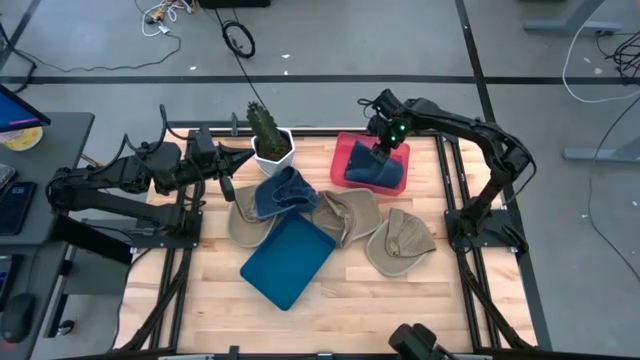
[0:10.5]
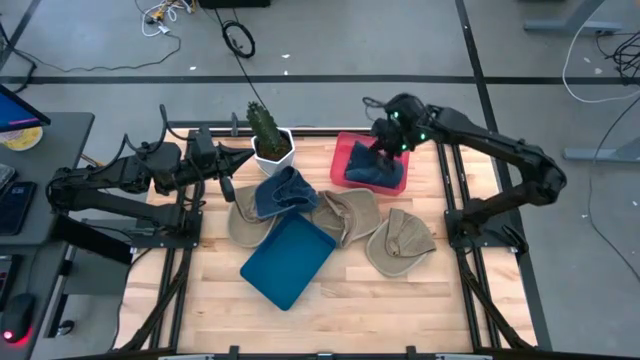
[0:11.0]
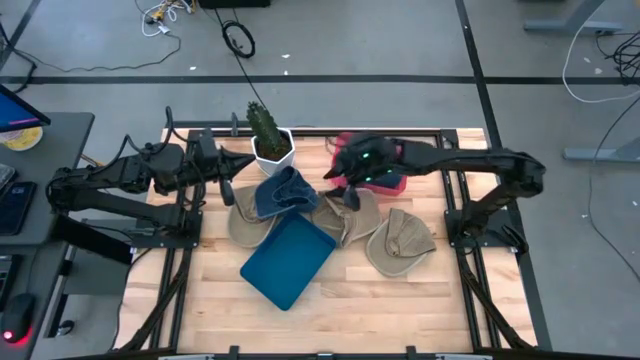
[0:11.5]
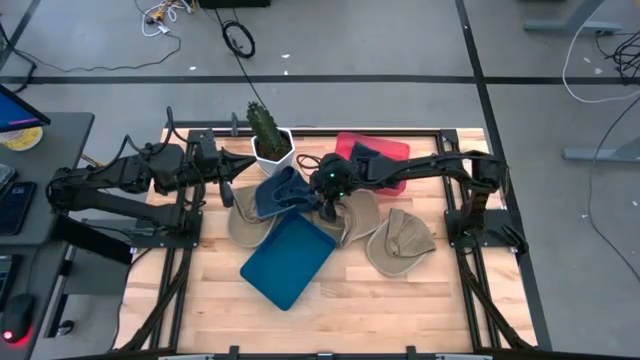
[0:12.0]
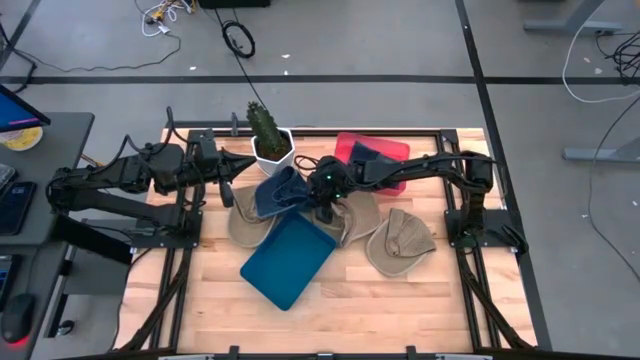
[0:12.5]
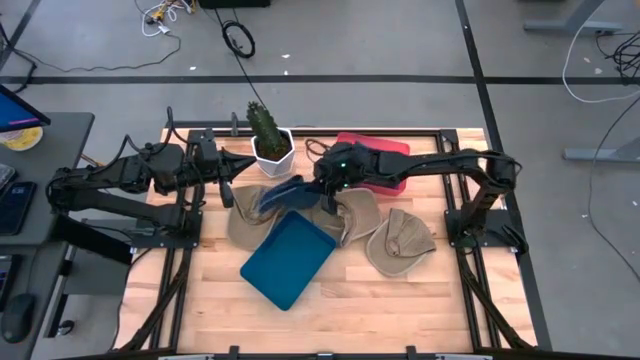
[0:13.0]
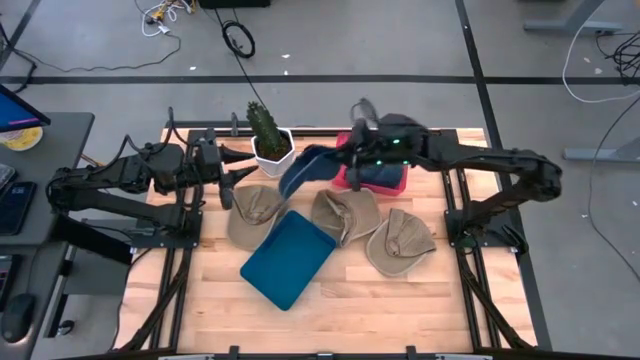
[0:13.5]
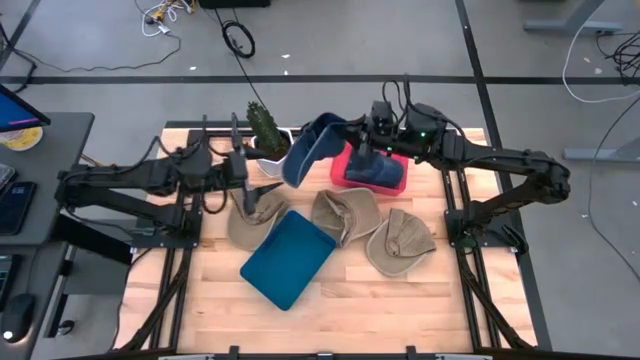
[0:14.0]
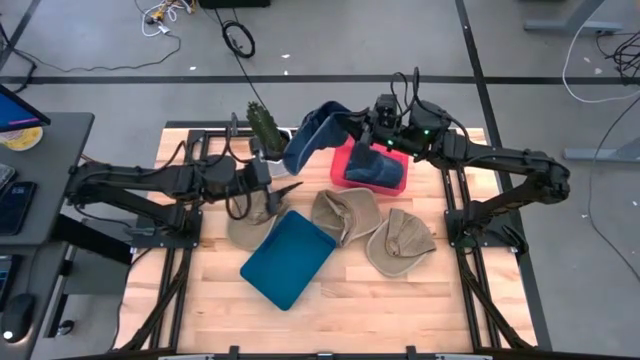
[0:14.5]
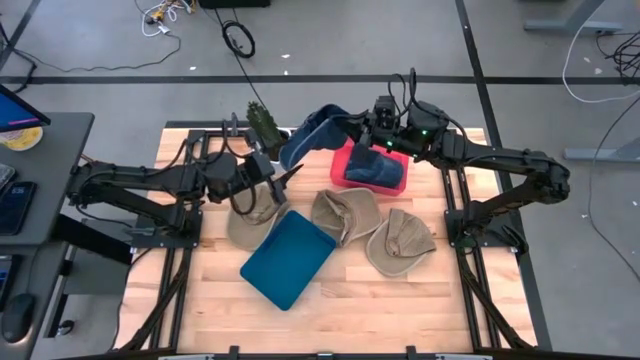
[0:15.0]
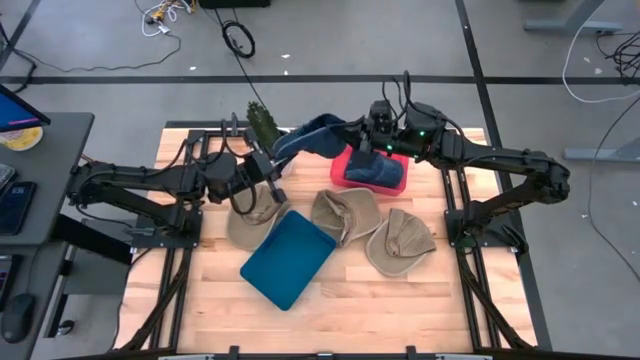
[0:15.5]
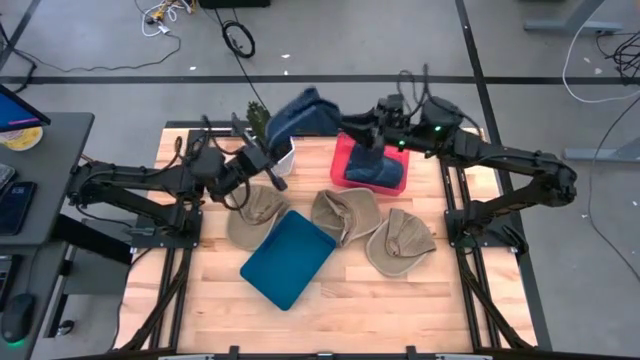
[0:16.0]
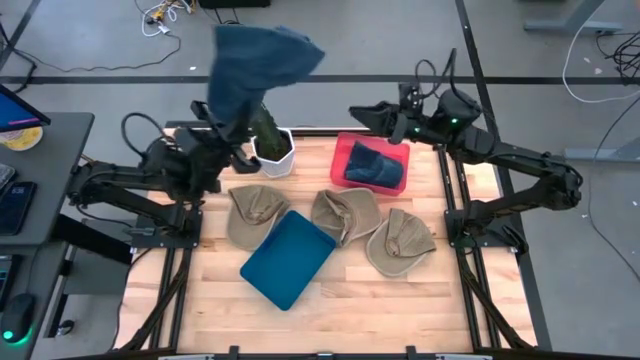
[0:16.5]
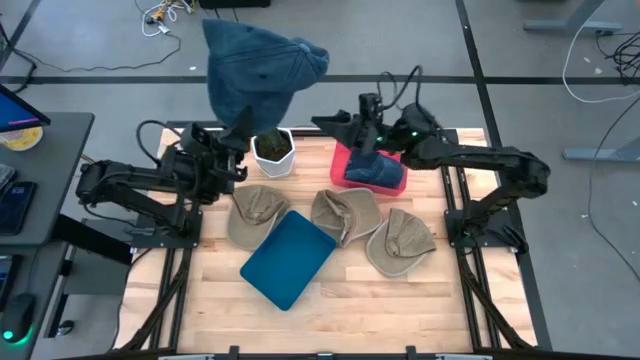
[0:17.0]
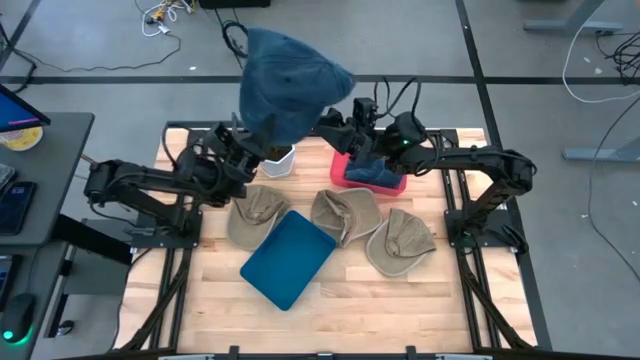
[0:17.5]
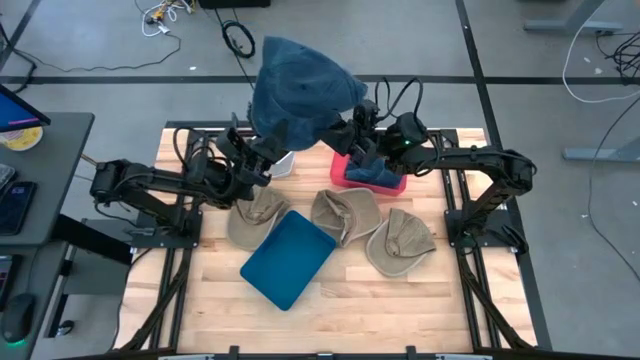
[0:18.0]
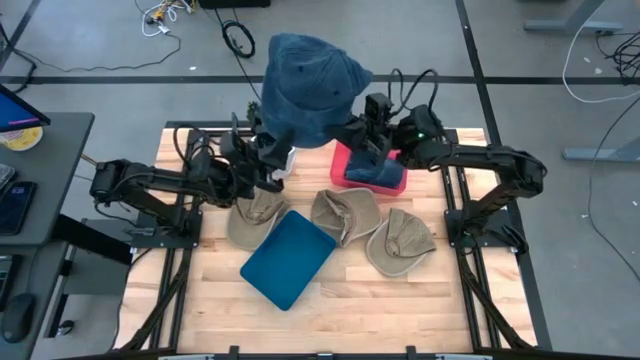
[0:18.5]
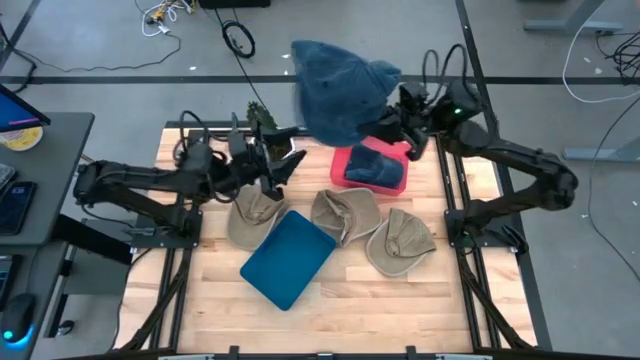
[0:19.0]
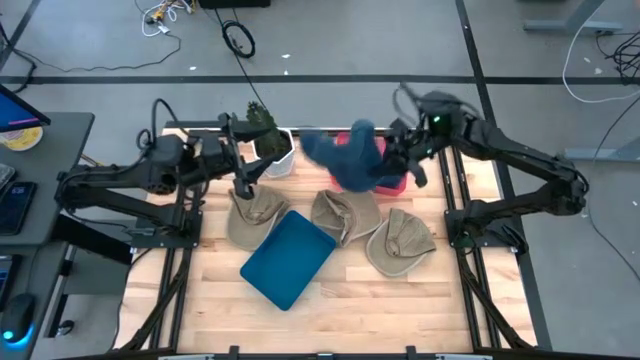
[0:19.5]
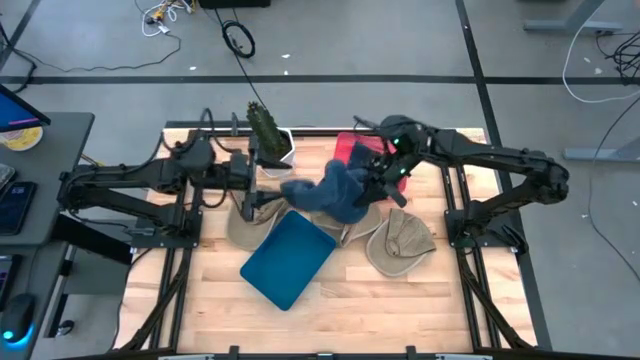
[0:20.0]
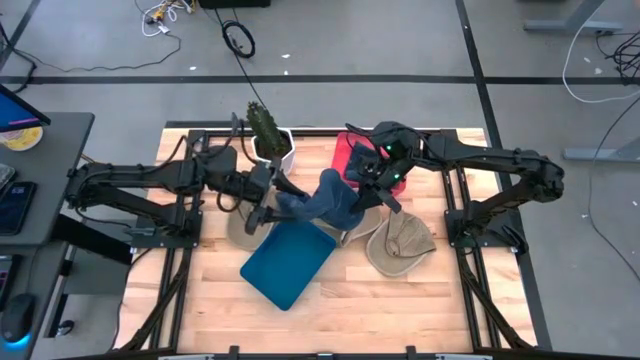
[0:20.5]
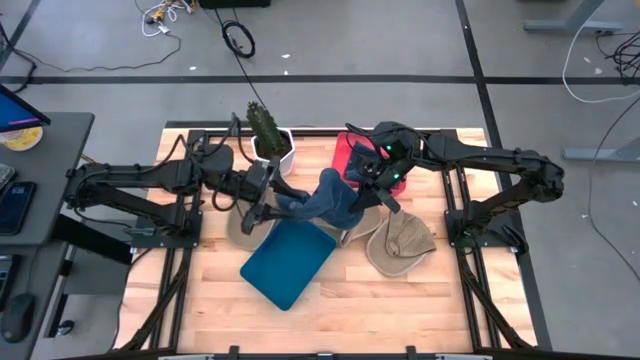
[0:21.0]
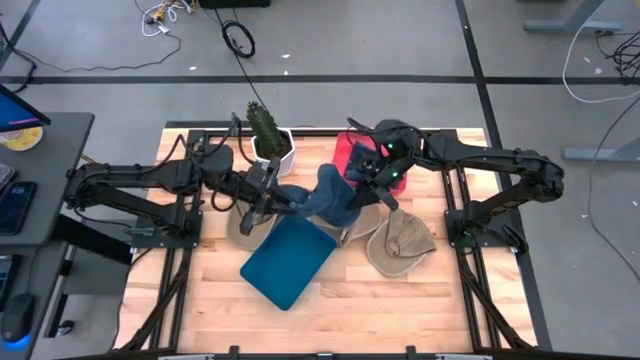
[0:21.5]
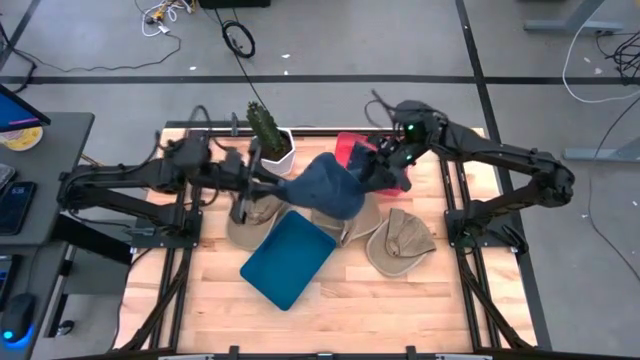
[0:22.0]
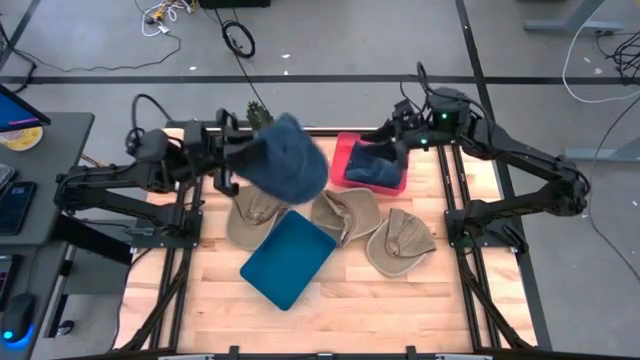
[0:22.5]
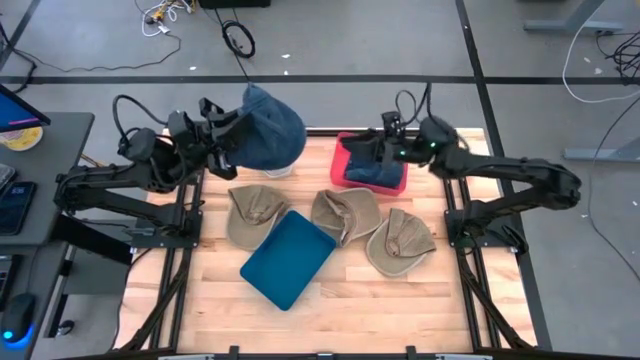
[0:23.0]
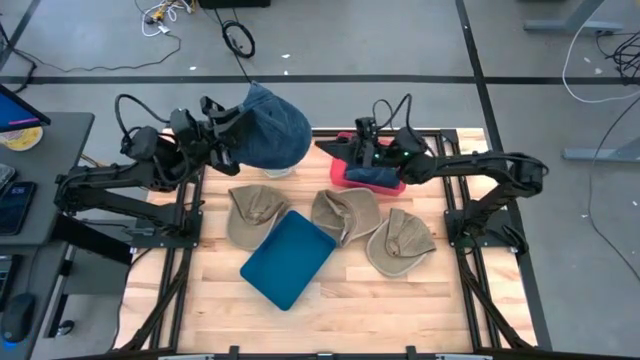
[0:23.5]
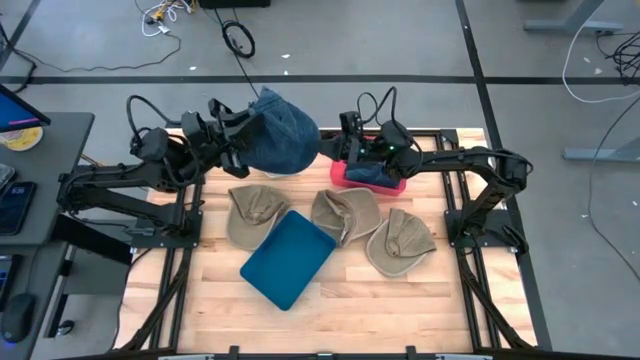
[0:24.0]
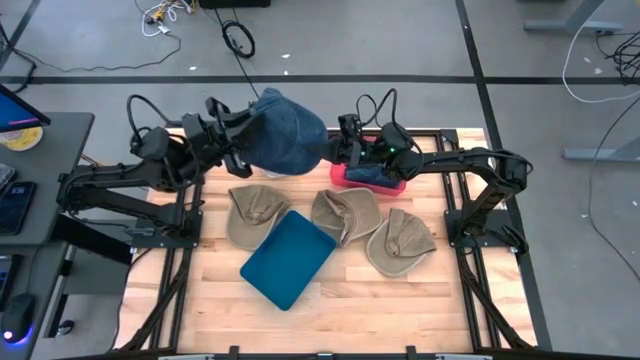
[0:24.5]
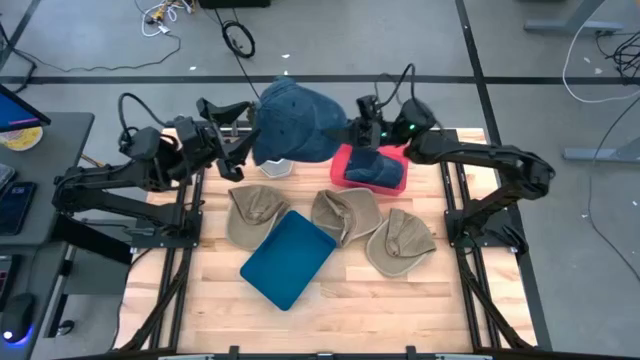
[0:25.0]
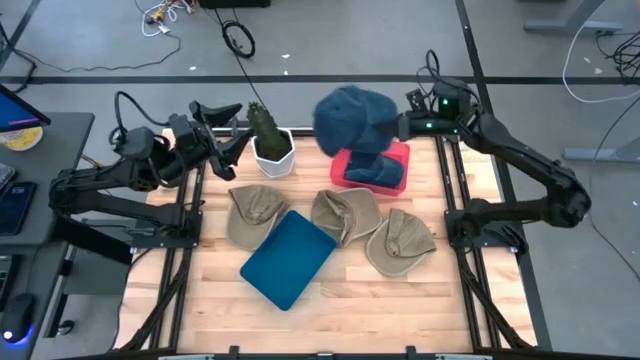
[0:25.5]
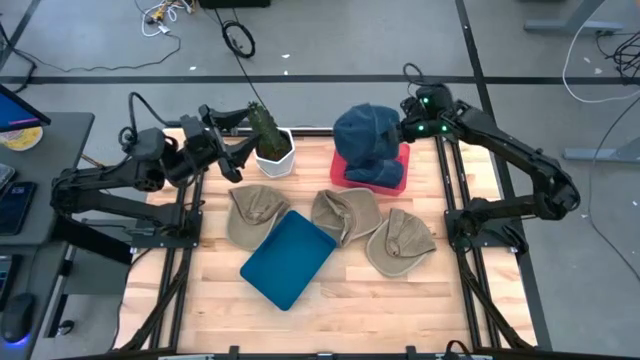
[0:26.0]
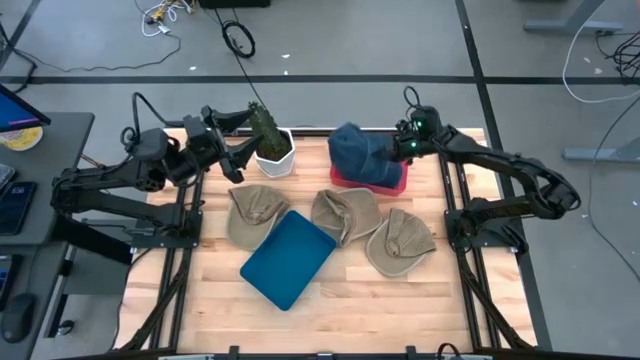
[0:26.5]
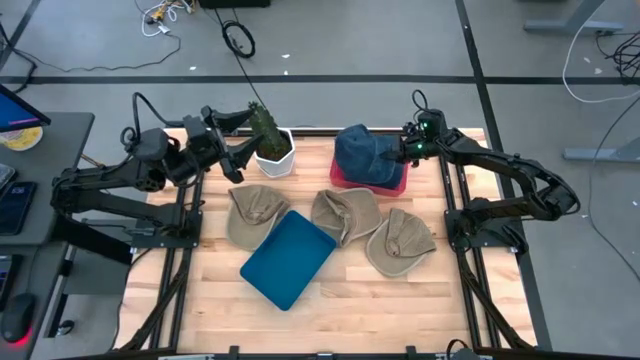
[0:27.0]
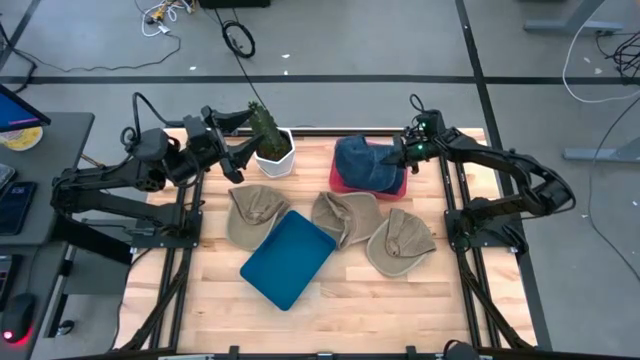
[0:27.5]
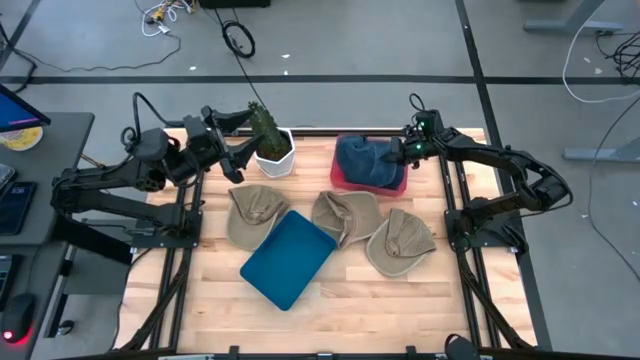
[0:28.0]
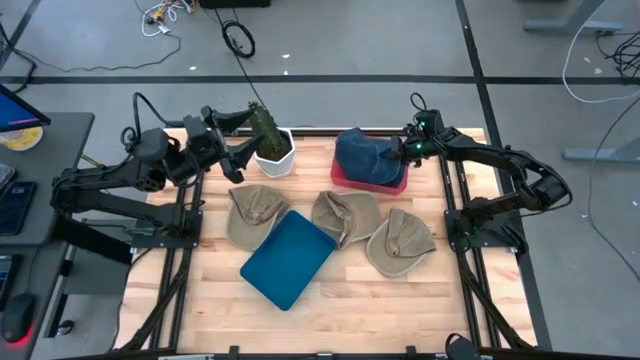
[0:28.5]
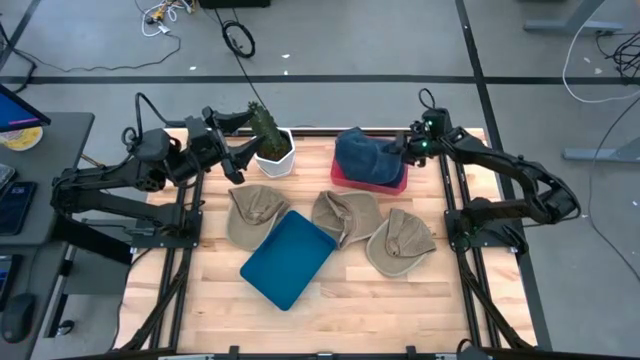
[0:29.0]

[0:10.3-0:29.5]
Task: Pick & Place hat
Put the blue cap into the pink bin
